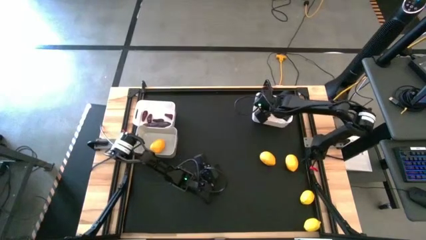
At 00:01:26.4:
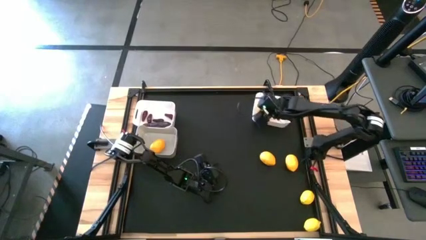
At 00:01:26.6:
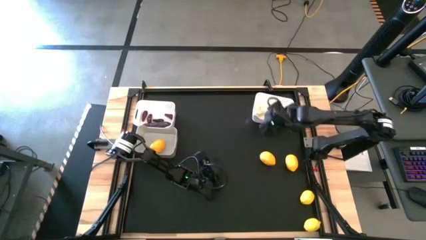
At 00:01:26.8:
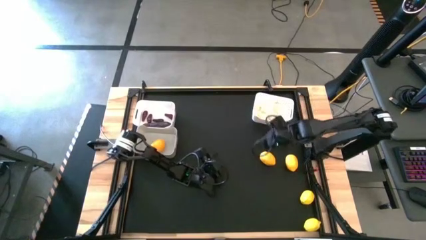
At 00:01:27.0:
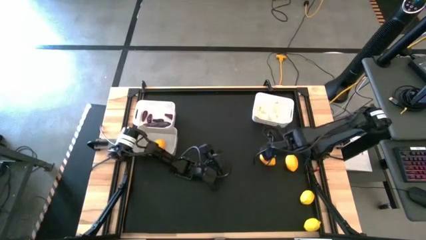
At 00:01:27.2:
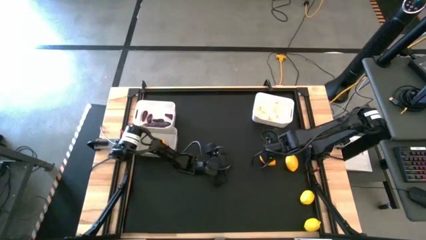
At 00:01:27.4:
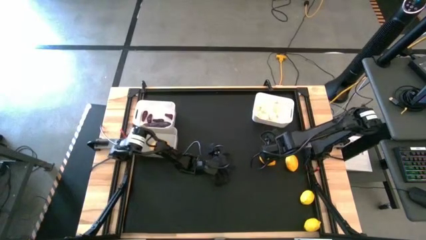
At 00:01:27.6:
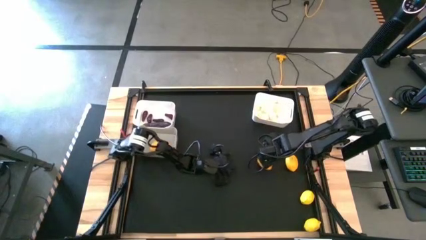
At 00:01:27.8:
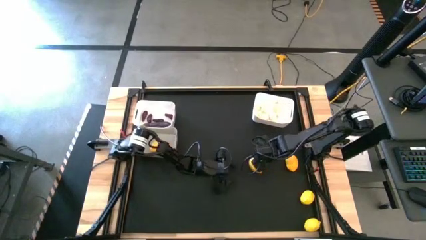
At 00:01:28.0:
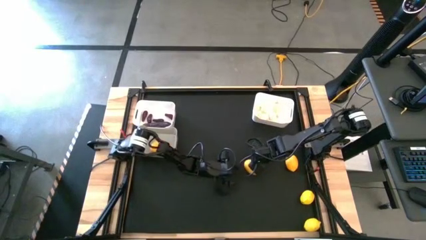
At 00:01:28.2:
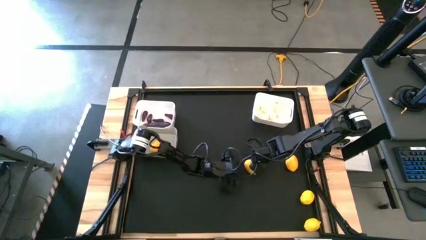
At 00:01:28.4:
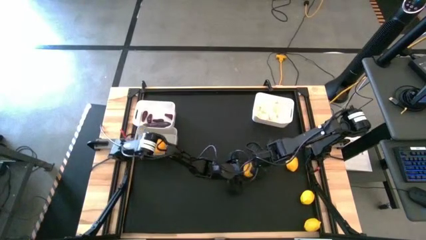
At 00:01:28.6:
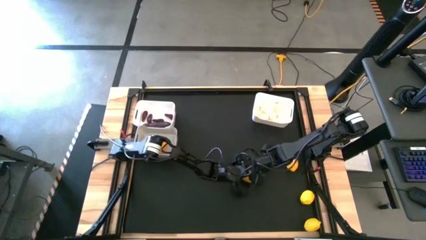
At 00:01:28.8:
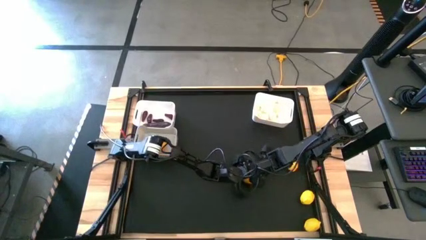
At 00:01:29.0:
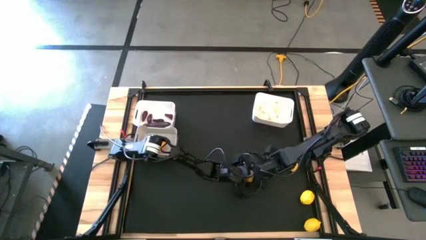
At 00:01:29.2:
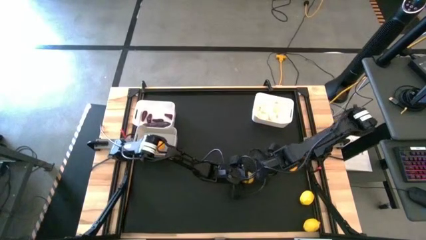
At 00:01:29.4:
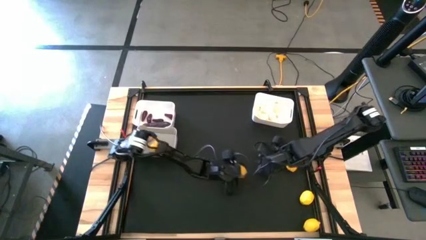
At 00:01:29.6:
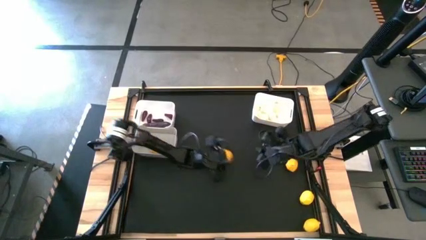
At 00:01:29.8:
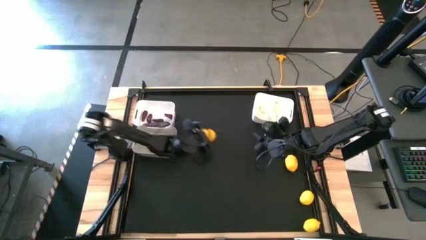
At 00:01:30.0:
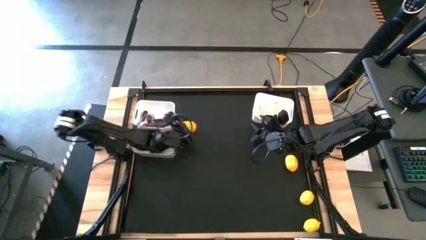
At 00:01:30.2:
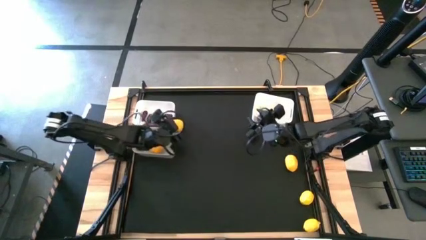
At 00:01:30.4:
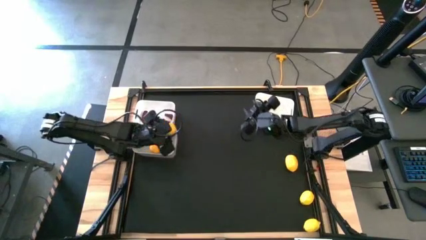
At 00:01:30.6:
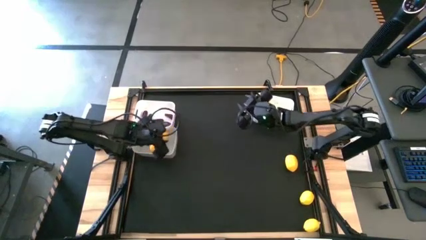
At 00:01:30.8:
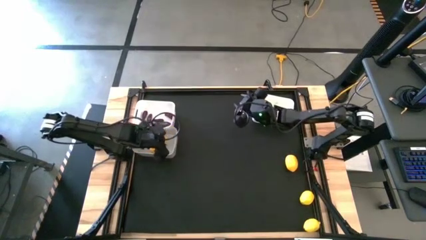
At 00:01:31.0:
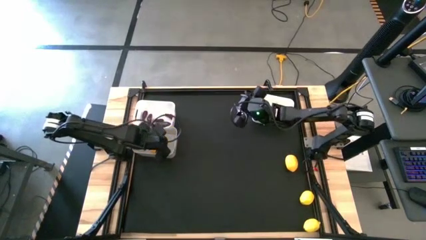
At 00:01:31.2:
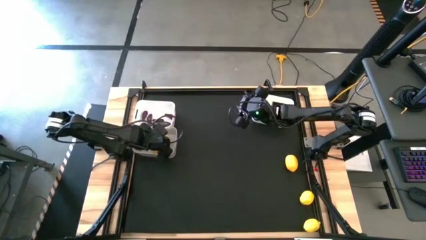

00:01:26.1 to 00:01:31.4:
Task: Sort produce into baskets
Put the lemon into the bottom gray bin

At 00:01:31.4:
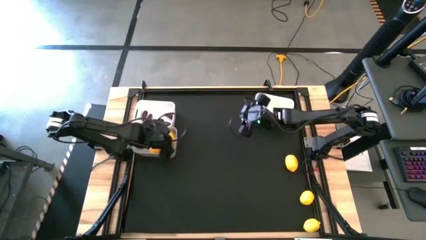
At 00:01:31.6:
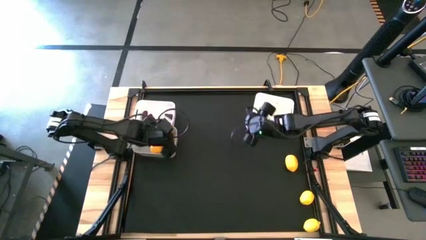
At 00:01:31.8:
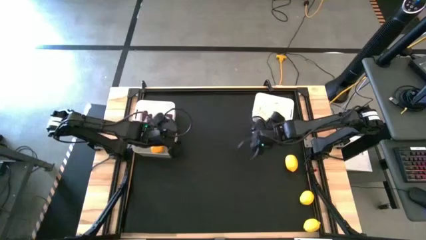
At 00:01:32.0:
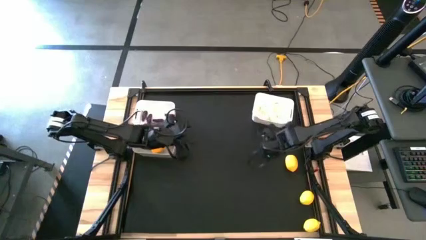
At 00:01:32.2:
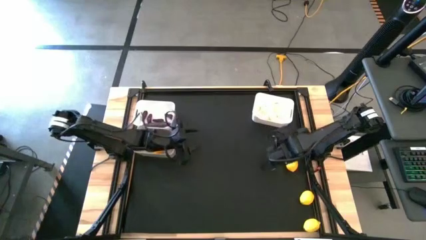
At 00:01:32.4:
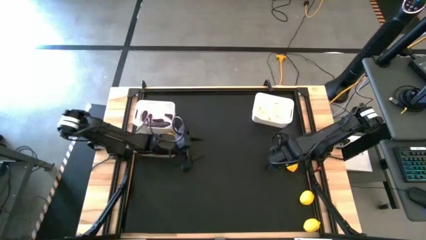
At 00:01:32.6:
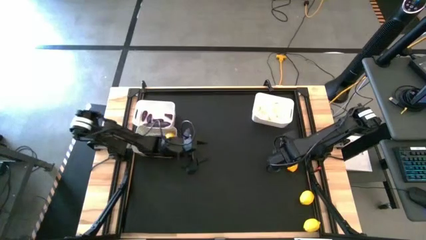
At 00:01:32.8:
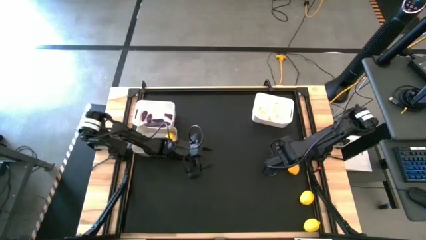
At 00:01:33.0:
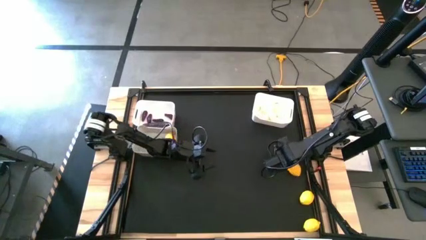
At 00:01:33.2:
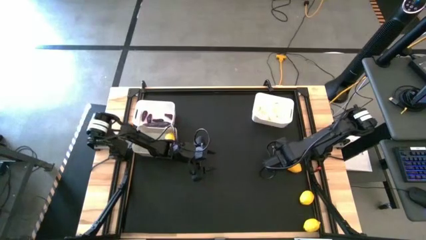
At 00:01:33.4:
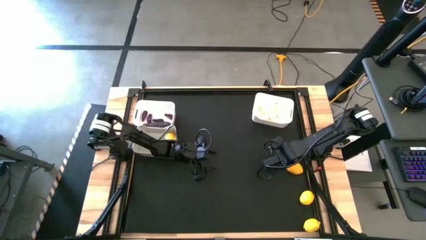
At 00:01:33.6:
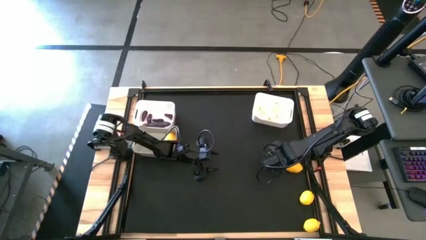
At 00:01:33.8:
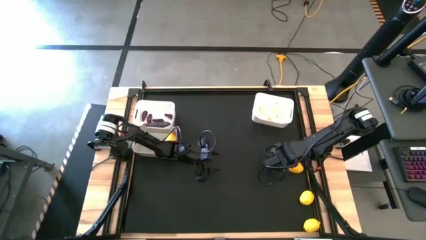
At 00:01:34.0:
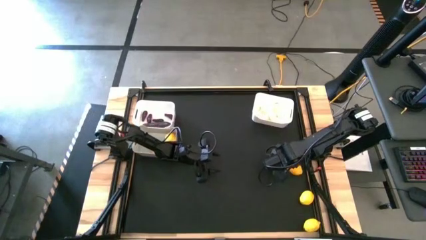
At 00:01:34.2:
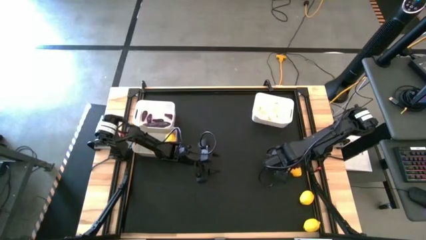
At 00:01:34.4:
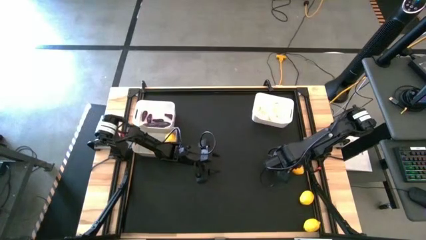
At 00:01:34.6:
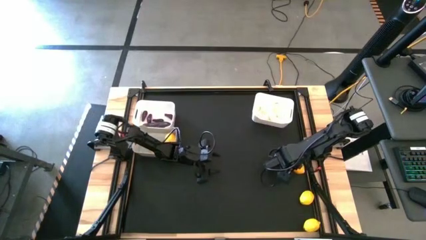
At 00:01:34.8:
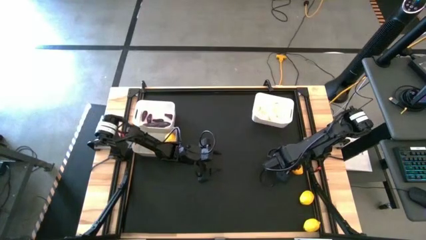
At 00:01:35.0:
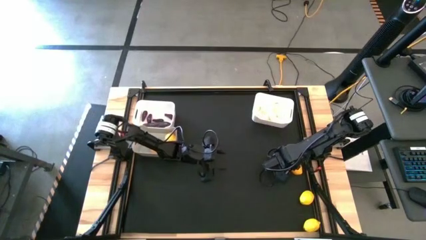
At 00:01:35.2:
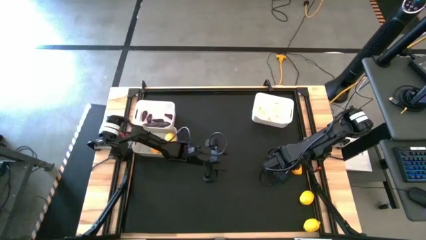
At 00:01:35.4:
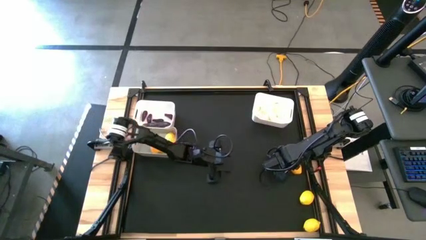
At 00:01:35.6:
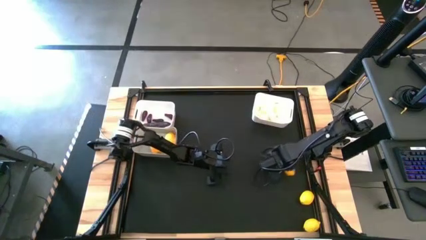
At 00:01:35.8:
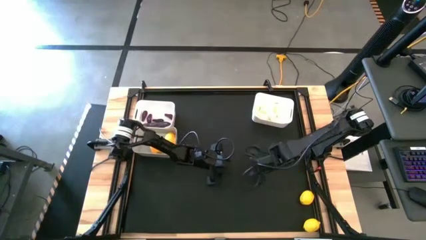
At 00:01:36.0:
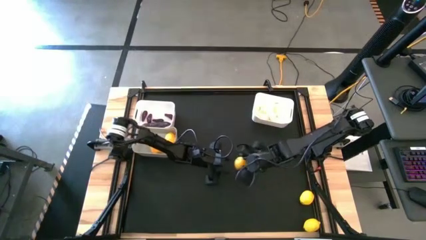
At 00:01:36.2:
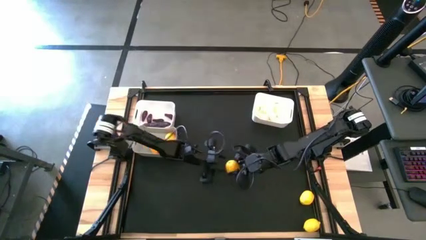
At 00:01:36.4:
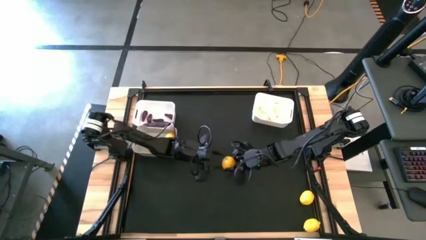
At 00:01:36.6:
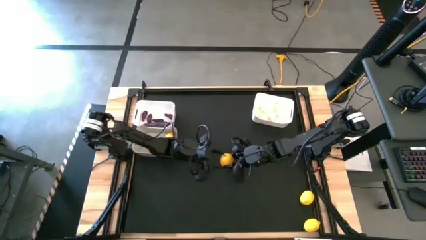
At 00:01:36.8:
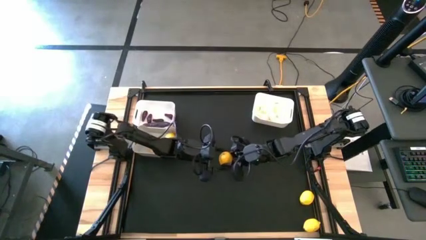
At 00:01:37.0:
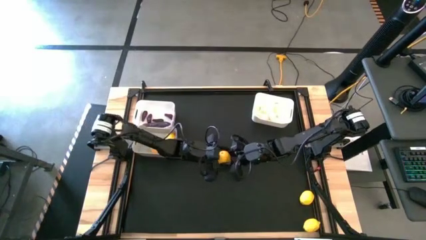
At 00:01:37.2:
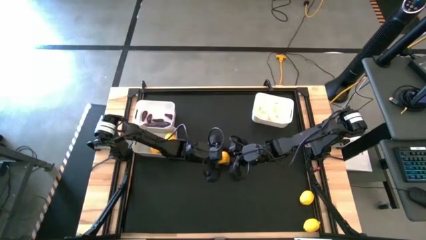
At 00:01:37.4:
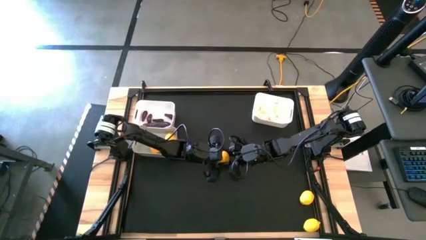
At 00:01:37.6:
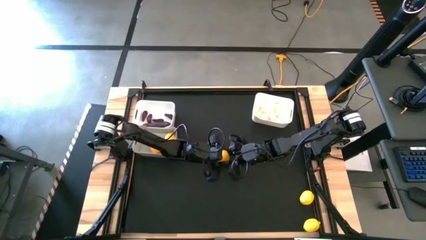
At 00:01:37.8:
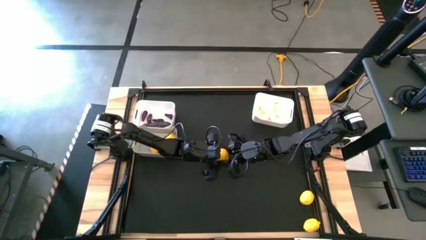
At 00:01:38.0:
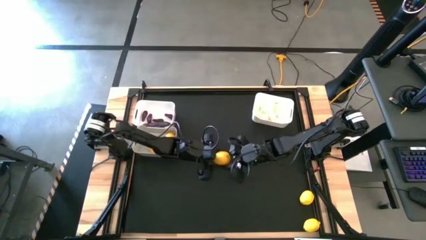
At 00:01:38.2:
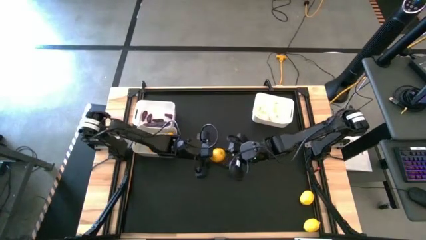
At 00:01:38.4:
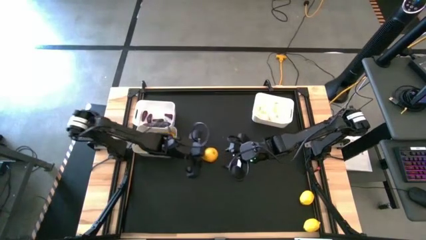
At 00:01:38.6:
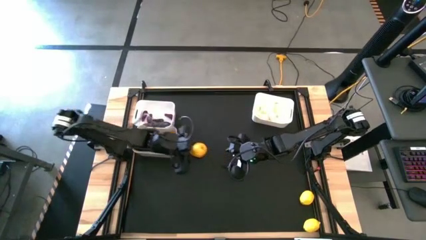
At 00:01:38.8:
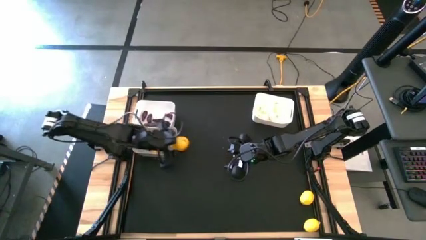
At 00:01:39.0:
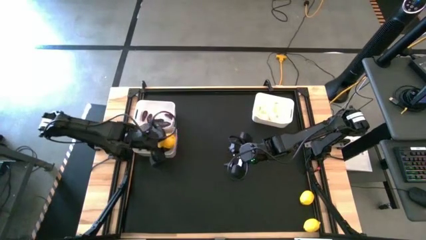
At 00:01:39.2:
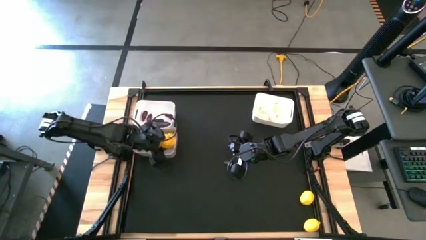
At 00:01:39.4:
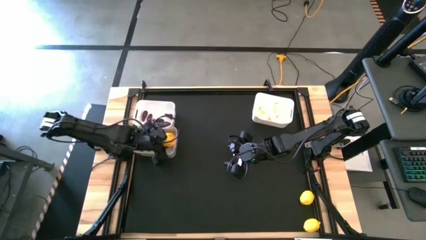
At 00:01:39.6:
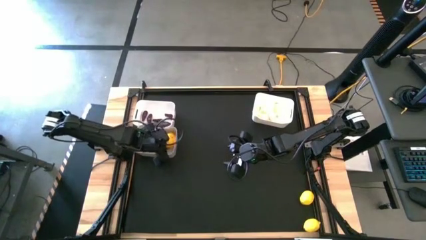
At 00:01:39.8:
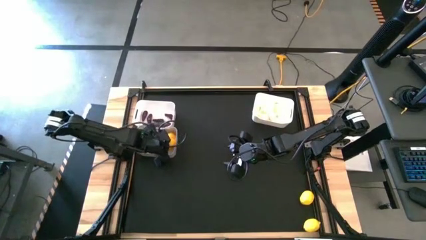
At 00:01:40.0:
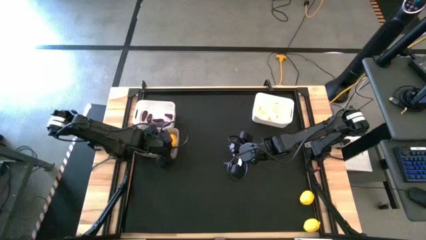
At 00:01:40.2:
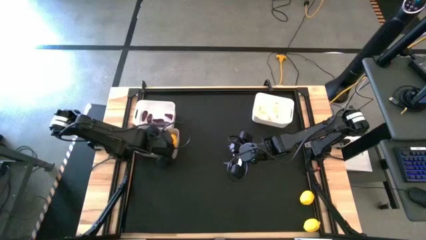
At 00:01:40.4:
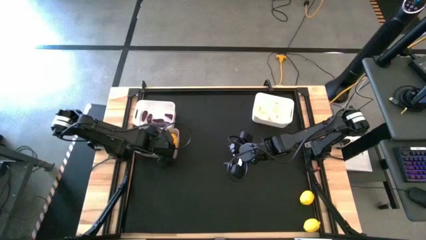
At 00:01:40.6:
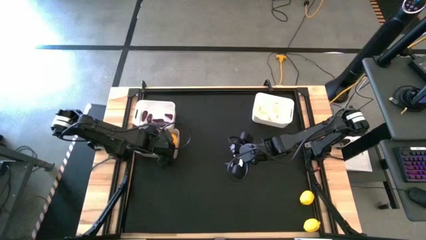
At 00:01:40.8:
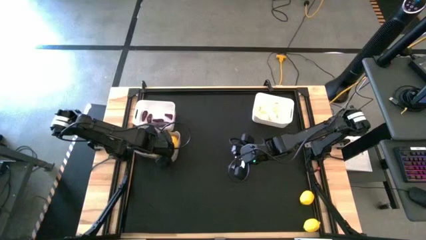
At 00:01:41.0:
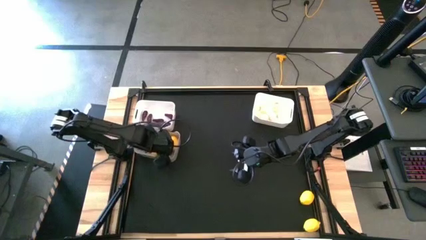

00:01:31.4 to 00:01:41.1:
Put the lemon into the gray bin
